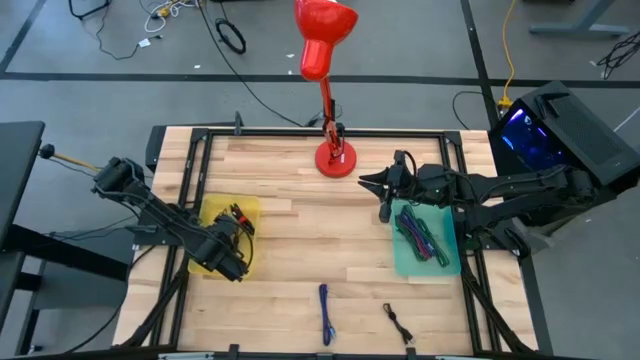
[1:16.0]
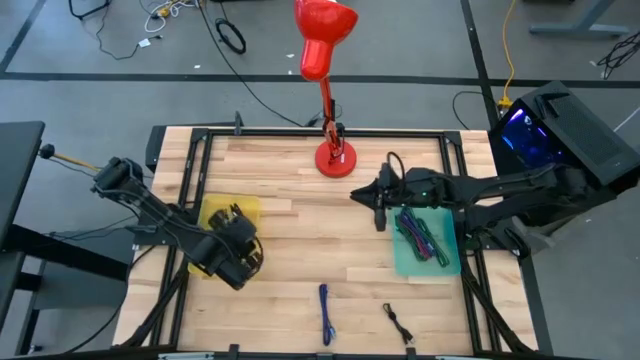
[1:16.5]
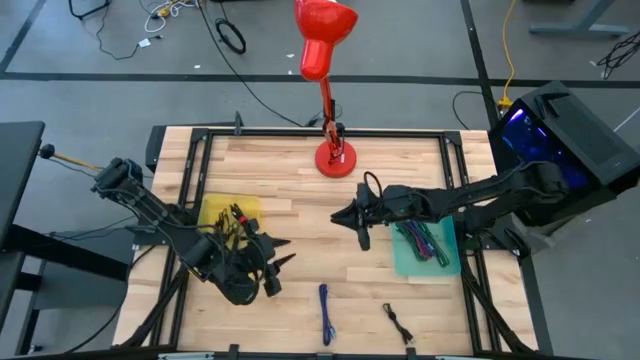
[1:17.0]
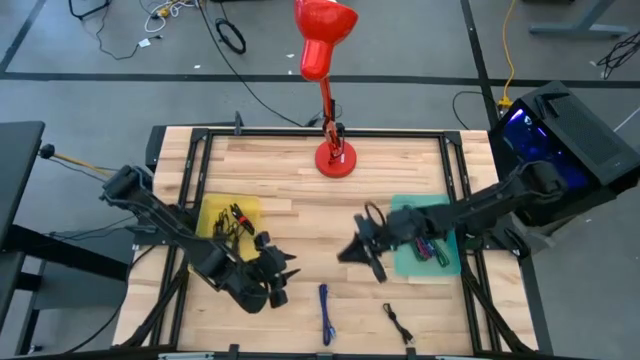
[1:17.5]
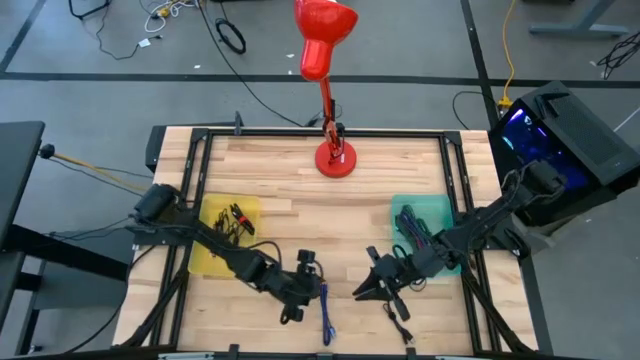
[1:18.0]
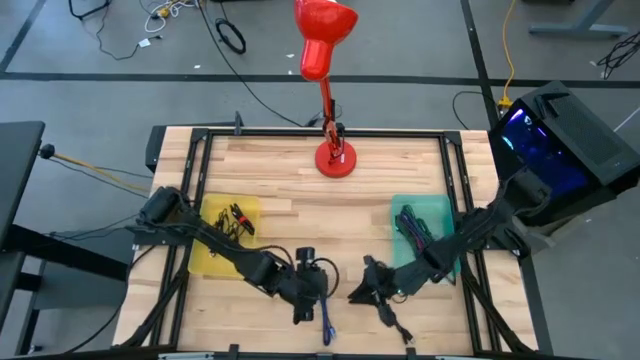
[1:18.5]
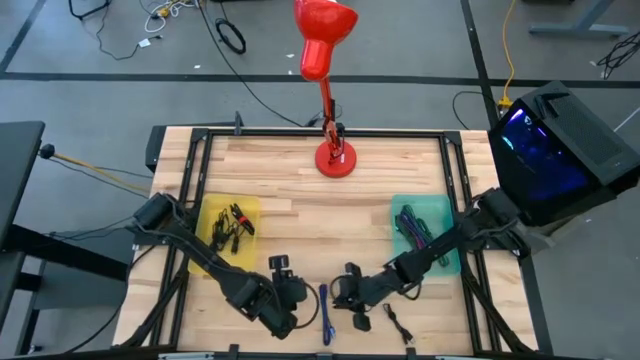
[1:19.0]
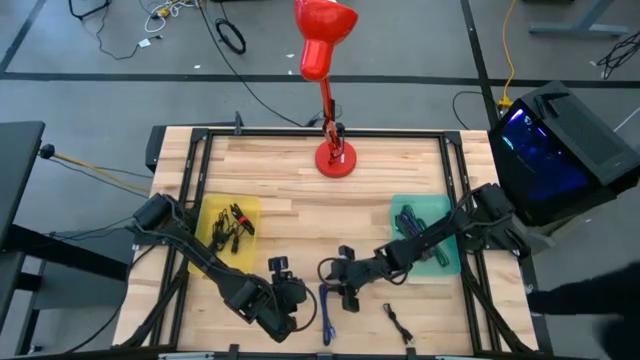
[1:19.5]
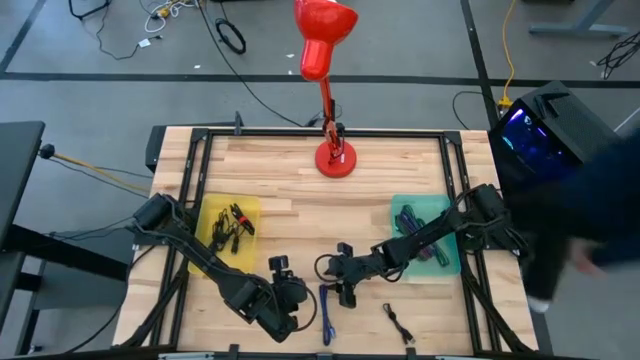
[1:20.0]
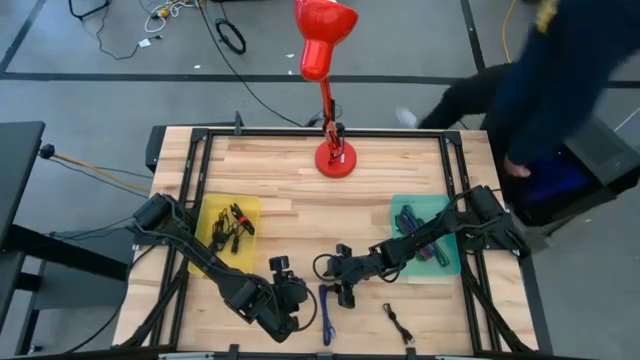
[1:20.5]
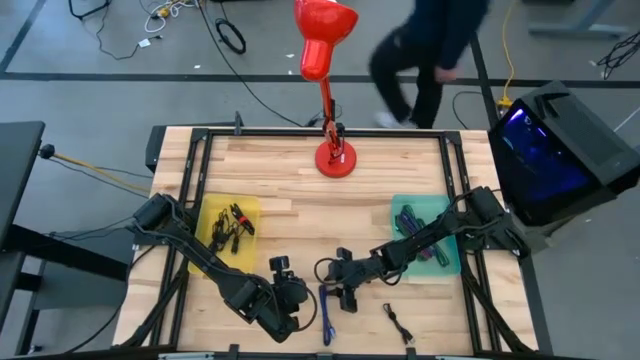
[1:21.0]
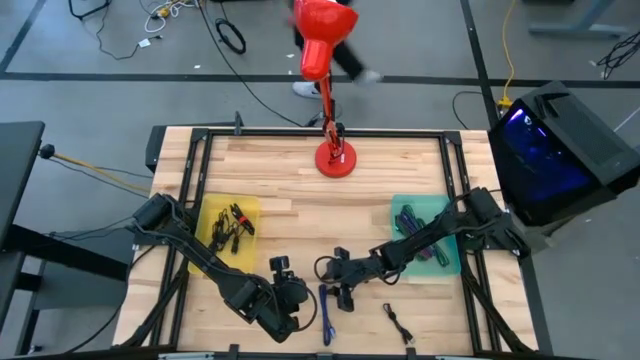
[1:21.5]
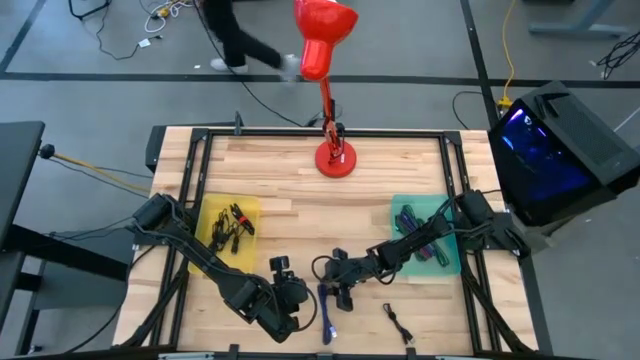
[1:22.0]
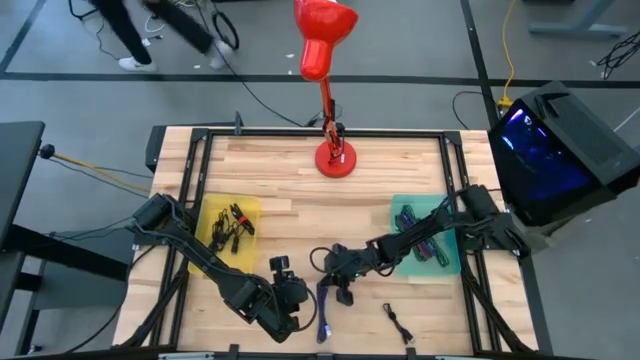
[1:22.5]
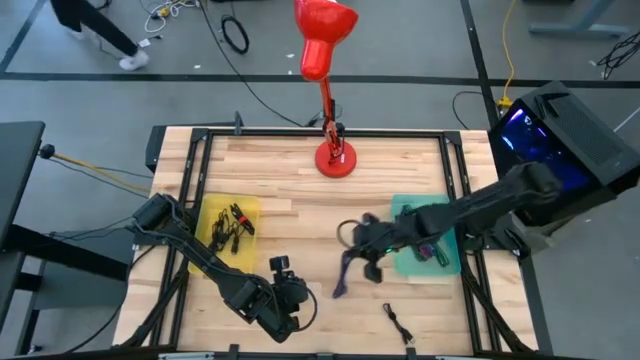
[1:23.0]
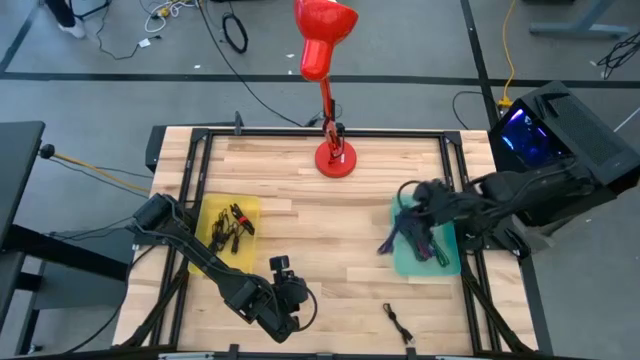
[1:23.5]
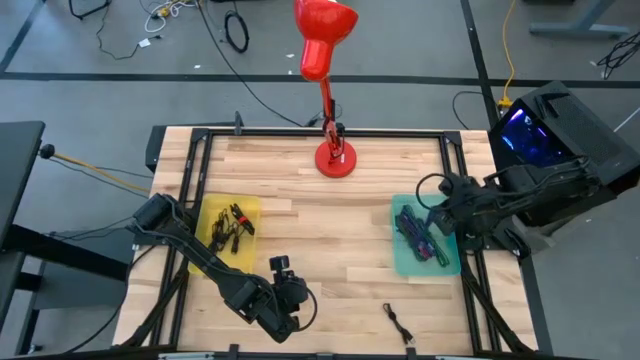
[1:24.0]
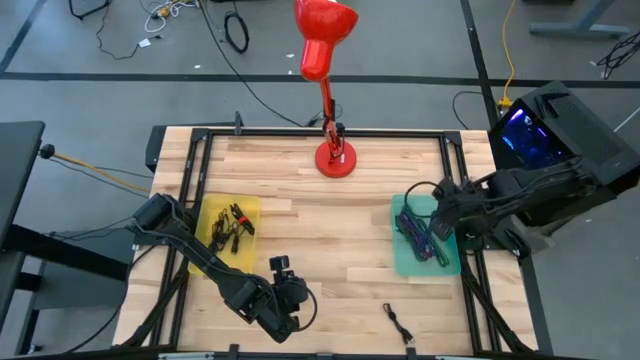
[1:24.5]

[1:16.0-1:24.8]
Task: Pick & Place USB Port
Put the blue USB cable into the blue transparent bin

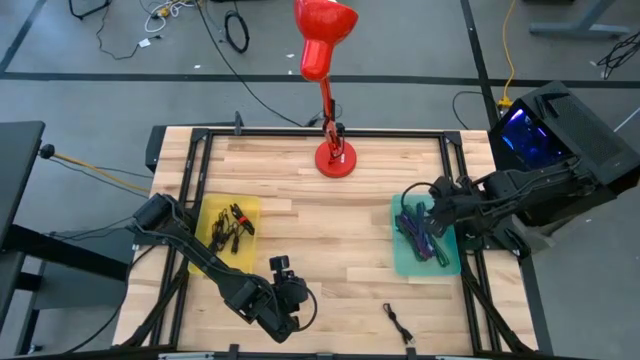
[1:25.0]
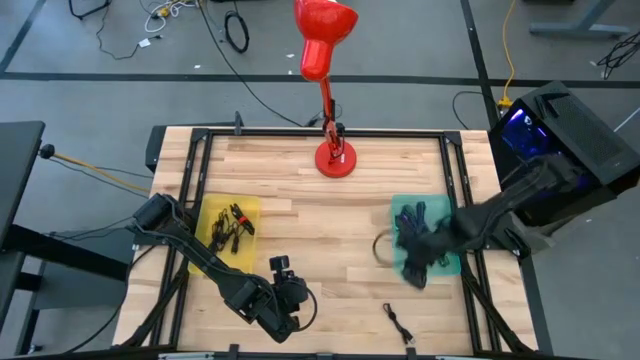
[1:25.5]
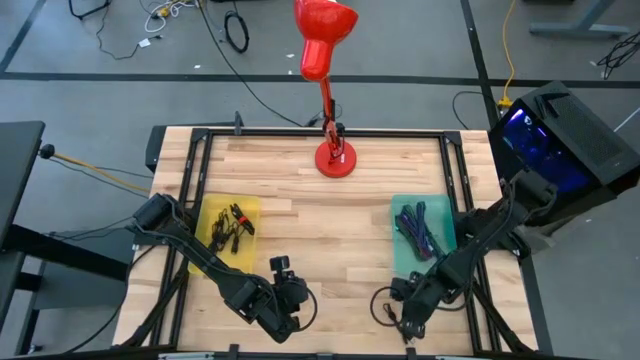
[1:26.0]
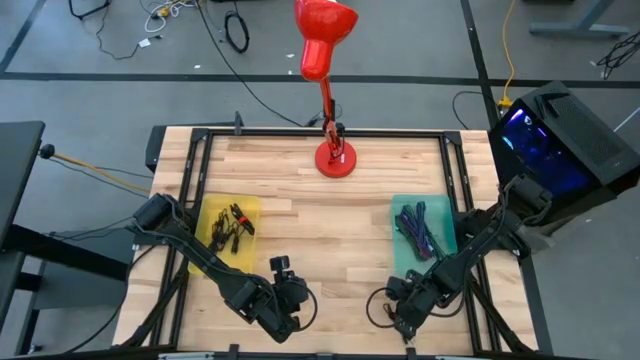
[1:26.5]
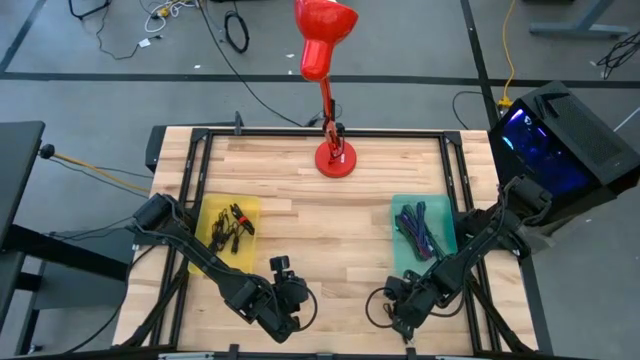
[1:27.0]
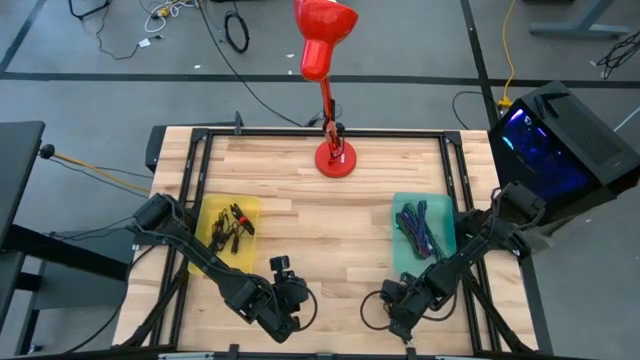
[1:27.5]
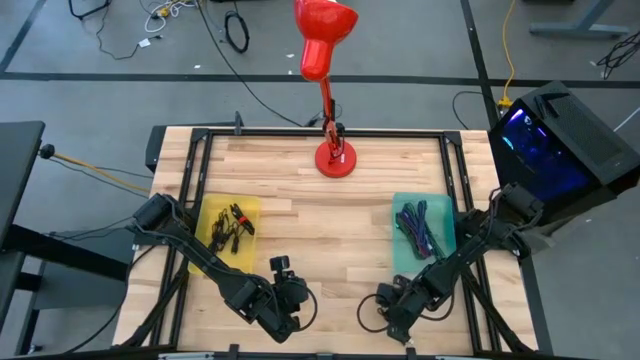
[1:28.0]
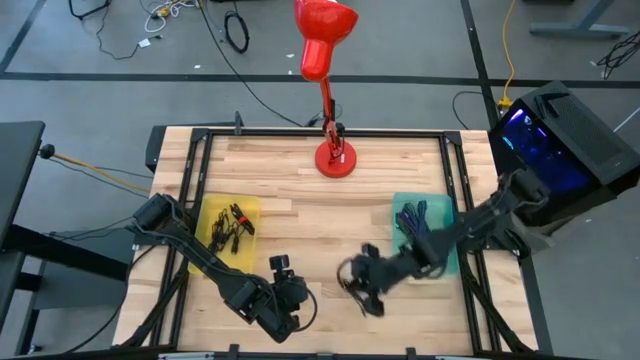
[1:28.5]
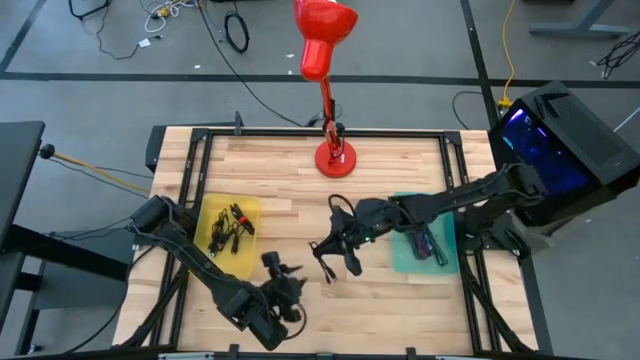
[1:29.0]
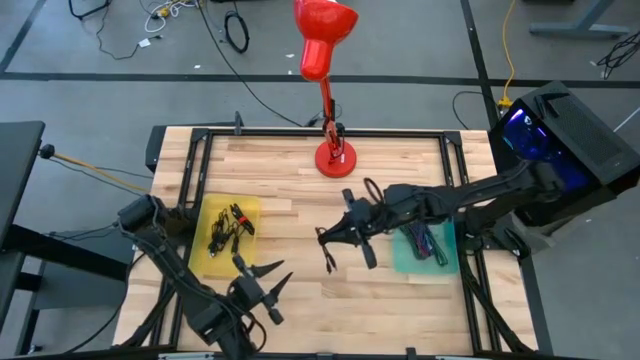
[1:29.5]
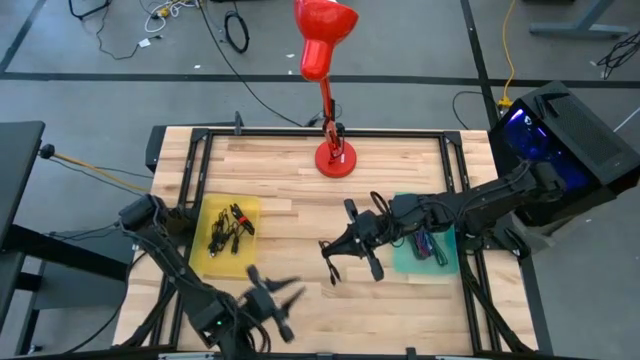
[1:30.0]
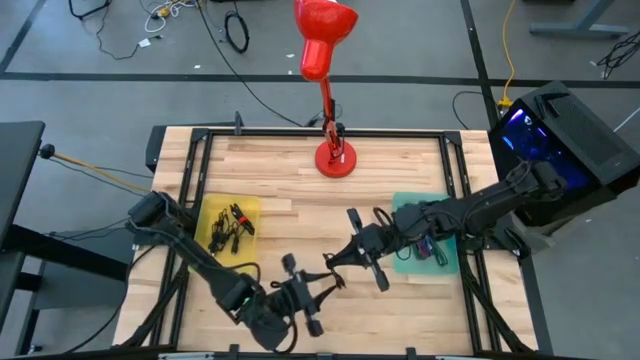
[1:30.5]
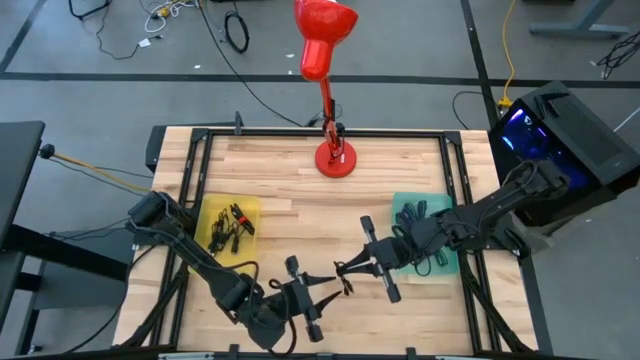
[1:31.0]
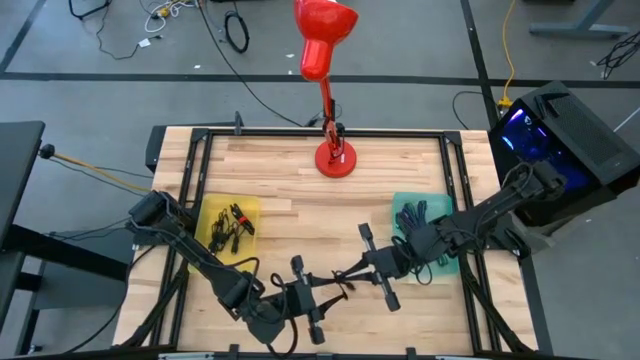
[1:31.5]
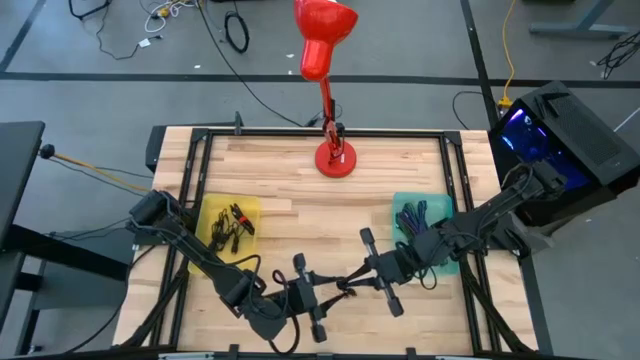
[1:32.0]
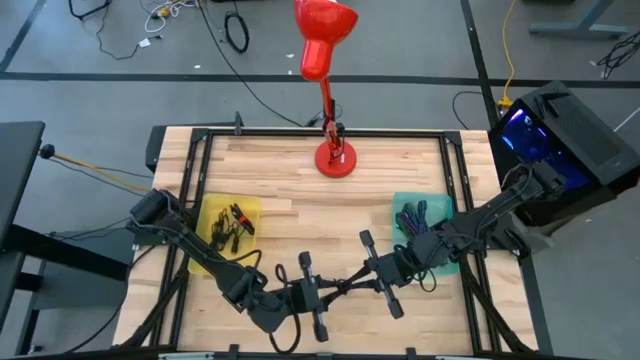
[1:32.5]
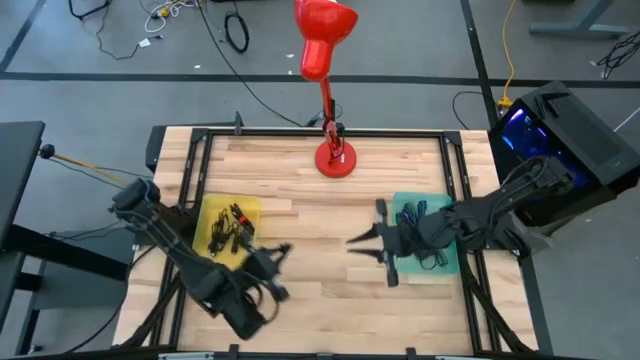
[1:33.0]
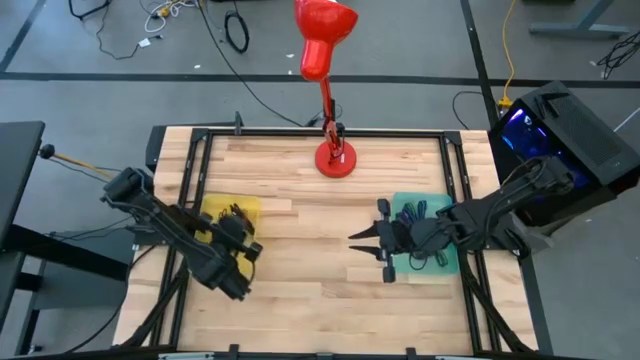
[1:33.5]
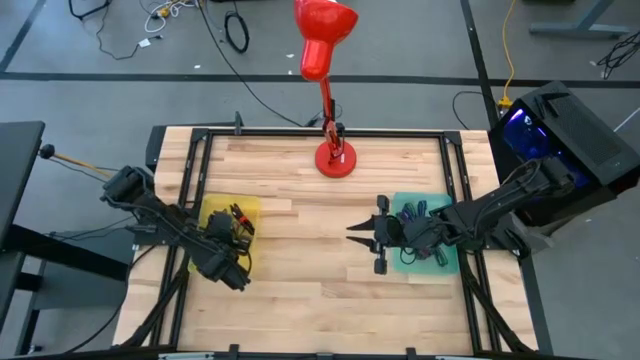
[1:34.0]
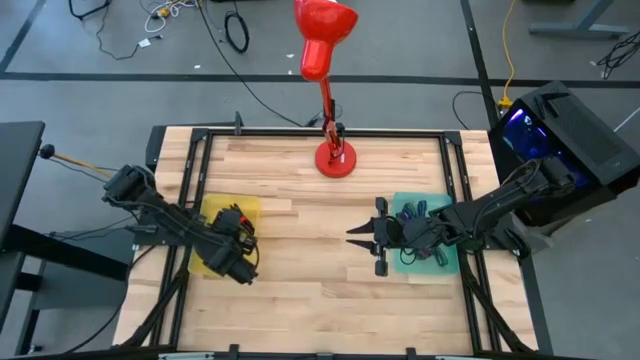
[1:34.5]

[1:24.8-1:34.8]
Put the black USB cable into the yellow transparent bin

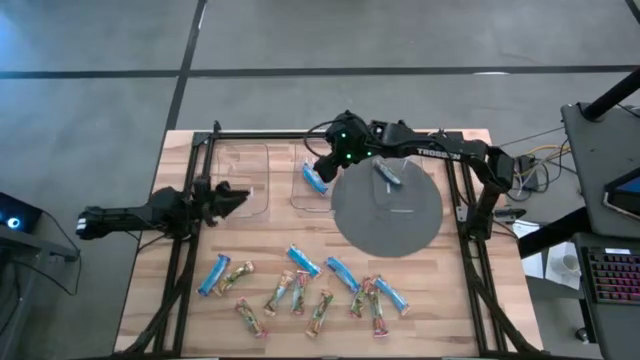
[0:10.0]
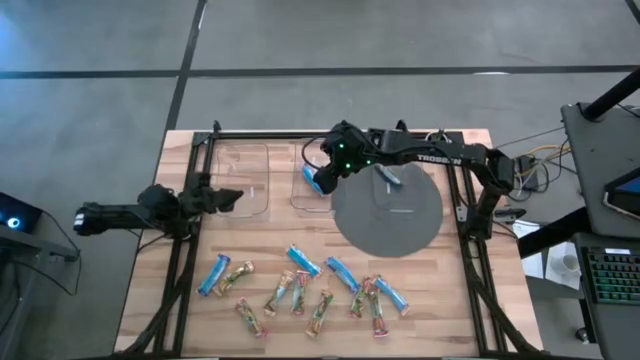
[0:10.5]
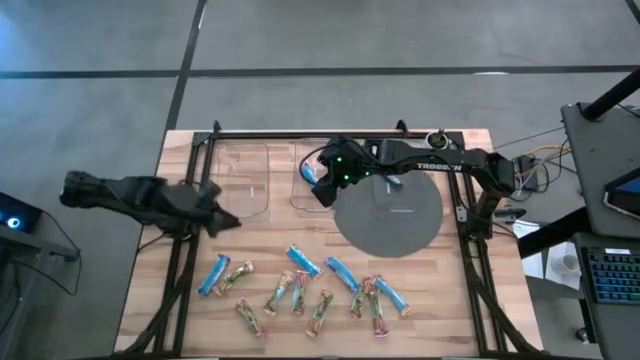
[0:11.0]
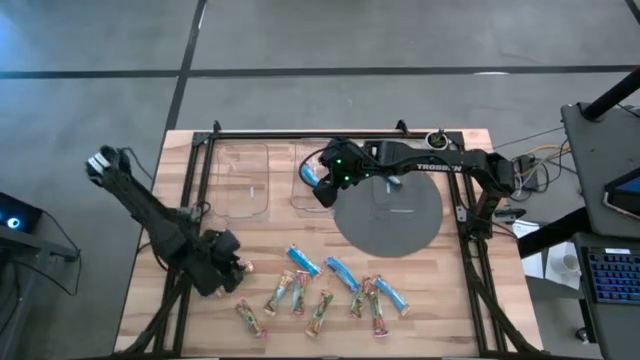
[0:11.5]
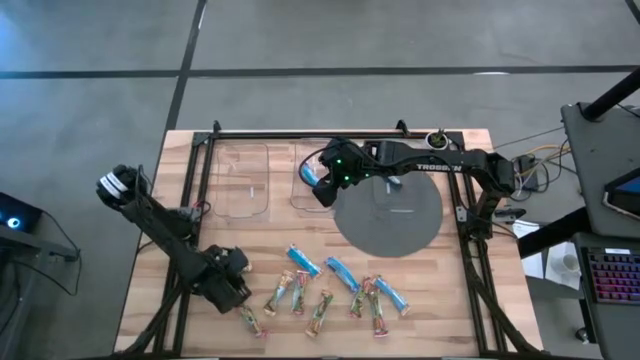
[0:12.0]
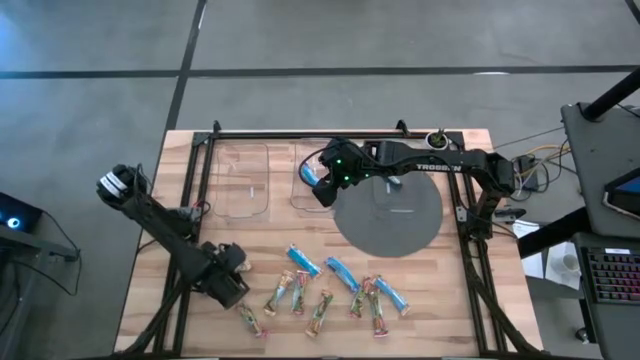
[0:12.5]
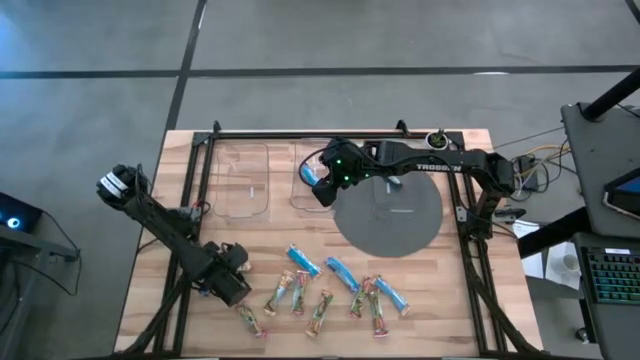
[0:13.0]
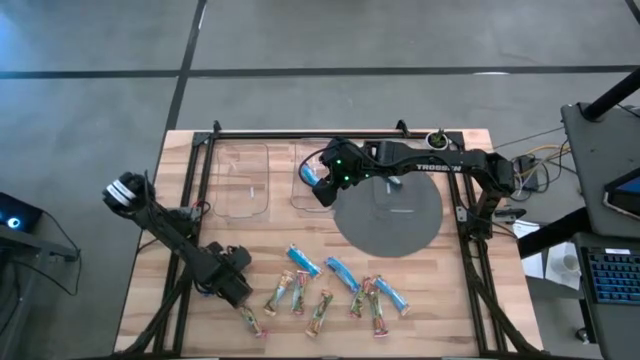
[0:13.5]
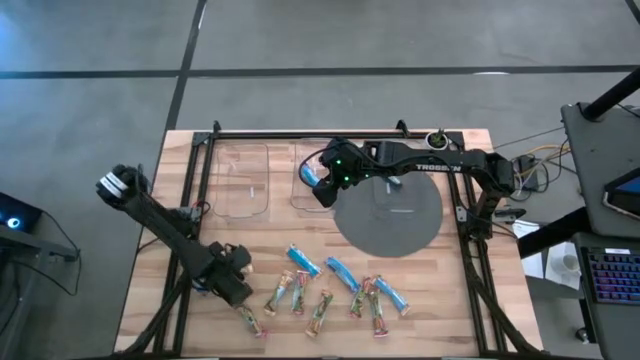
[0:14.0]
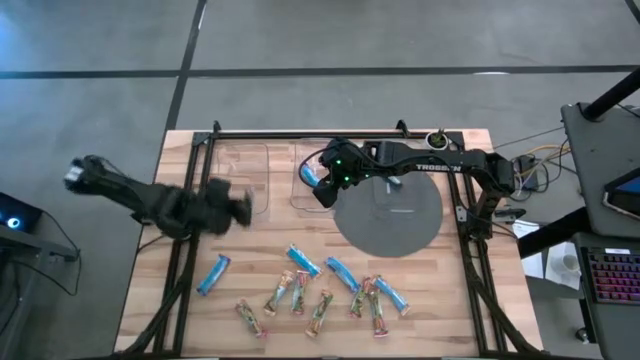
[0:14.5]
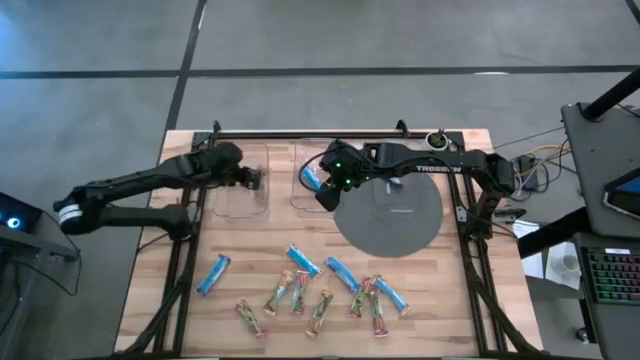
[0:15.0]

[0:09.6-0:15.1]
Task: Pick and place Granola Bars by type
Put the orange granola bar into the left transparent container
